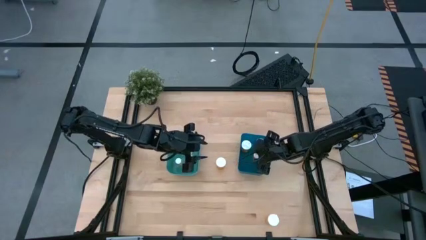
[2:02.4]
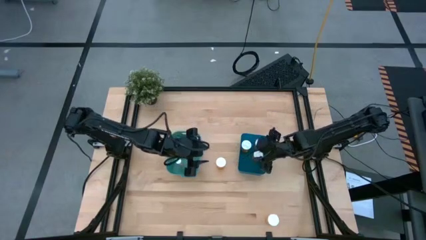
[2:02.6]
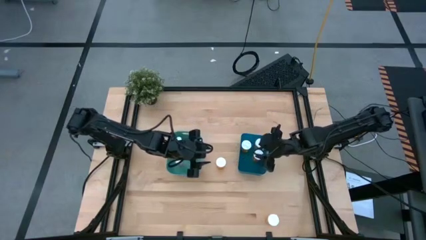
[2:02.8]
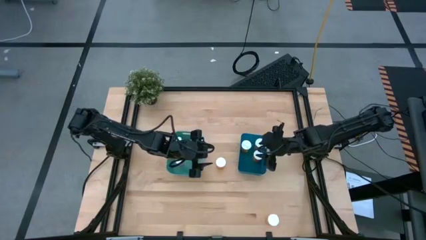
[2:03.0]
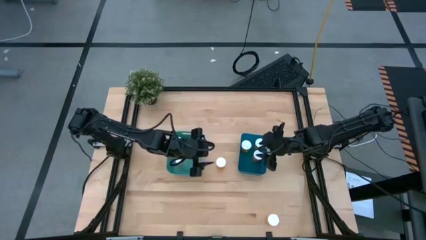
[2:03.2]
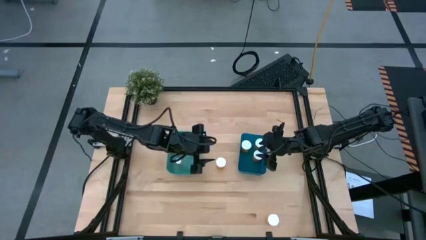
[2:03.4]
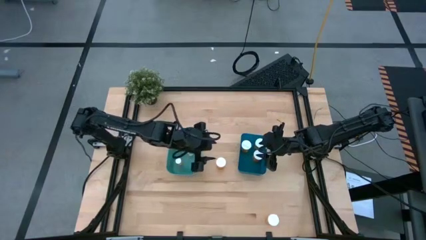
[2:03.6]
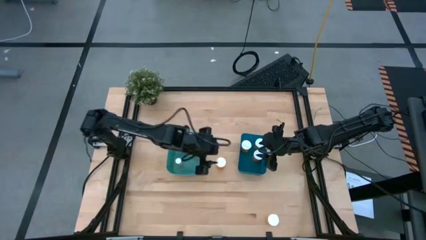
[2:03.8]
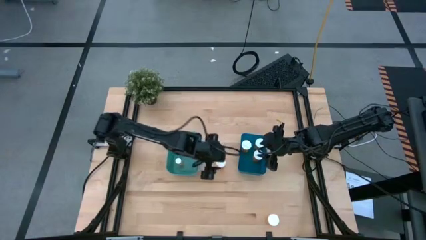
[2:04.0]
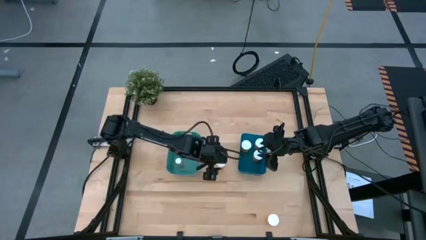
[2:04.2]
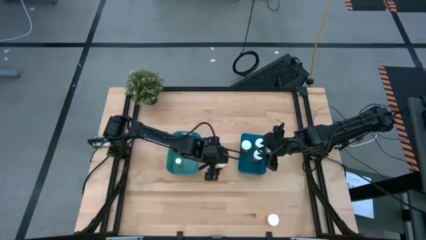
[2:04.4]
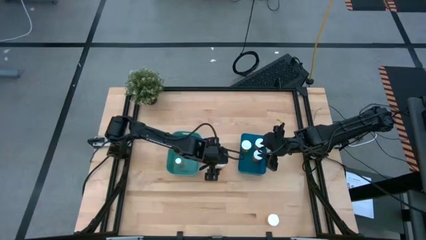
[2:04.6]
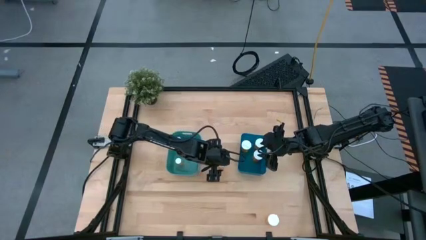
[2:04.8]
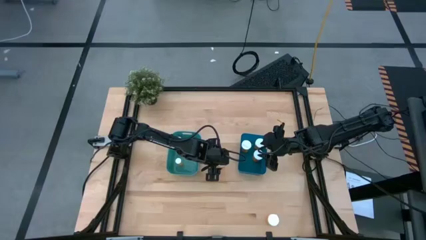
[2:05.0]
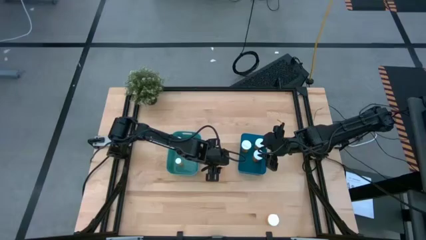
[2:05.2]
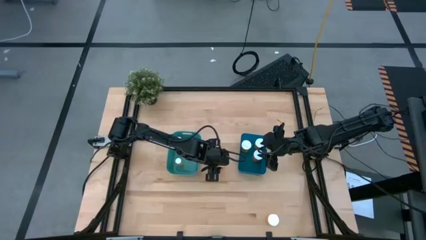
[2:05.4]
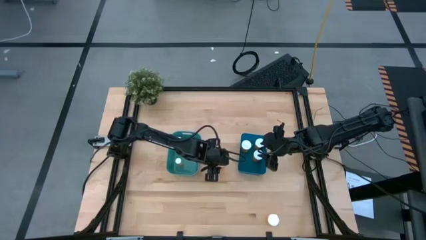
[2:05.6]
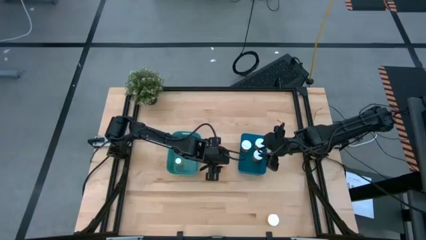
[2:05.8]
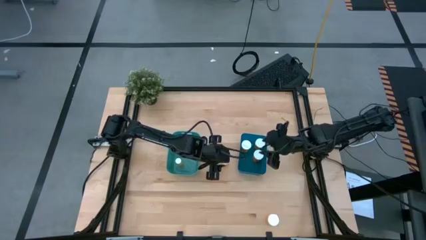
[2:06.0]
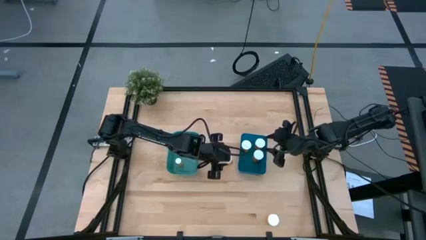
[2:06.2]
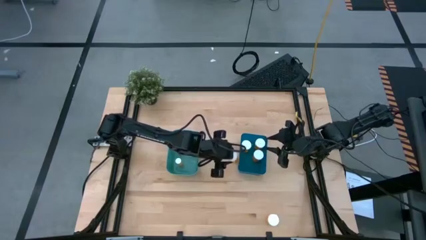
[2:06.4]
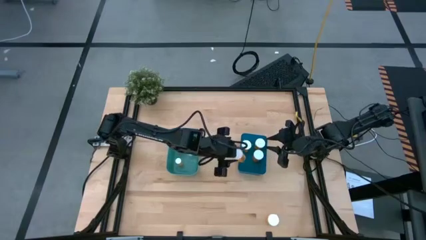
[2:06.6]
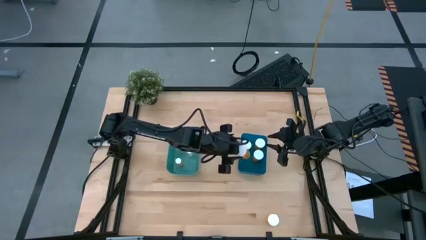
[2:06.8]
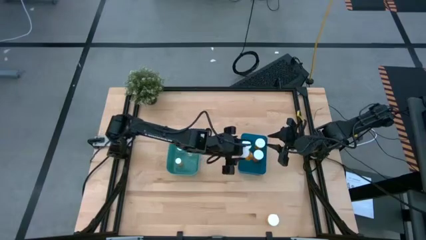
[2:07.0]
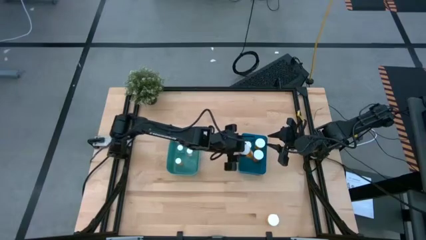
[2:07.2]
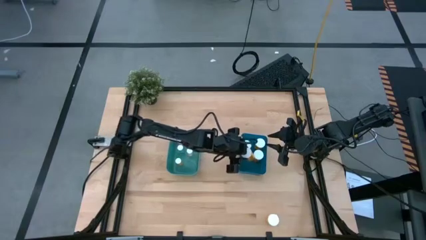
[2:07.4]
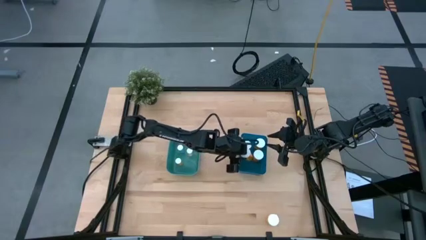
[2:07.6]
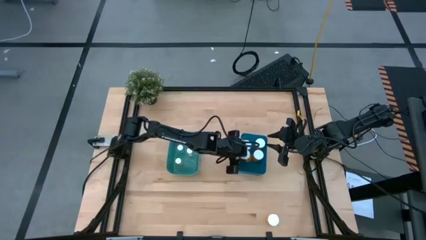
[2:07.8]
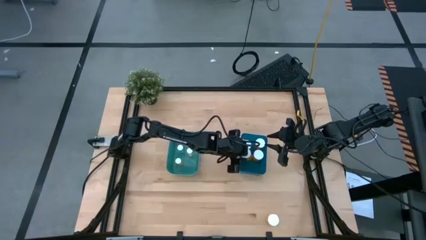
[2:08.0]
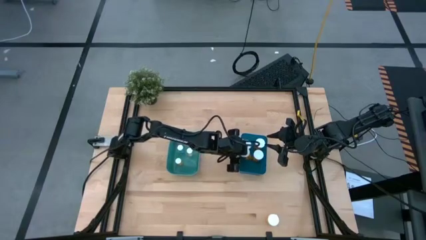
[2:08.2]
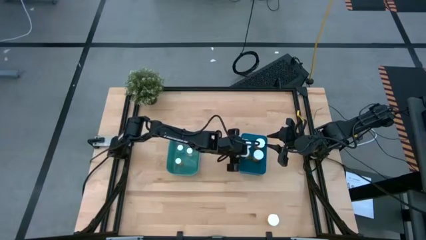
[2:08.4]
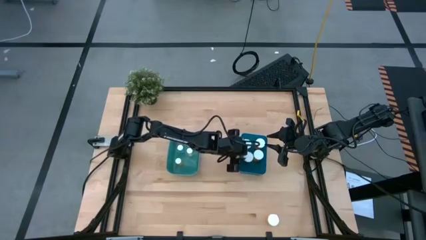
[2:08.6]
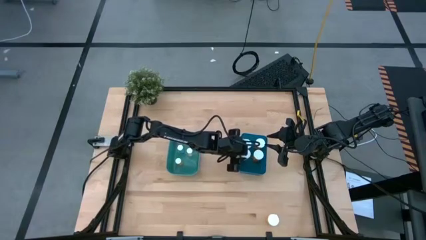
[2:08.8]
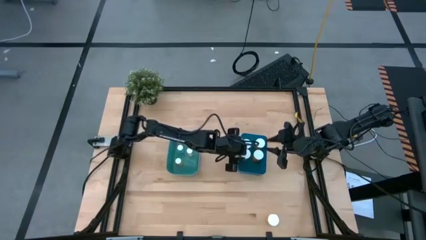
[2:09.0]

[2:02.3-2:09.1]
Task: Pick and place medicine bottles into bin by pill shape (circle, oval)
Put the large orange pill bottle into the blue bin

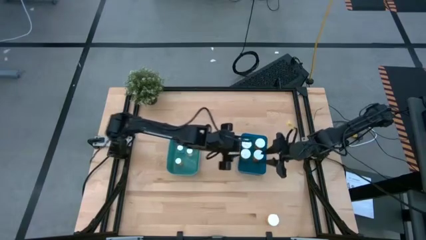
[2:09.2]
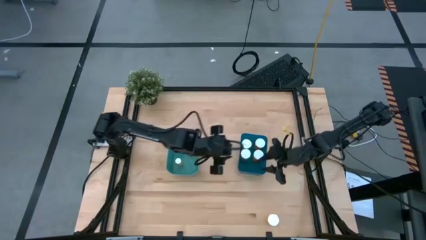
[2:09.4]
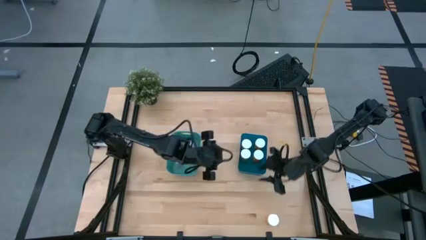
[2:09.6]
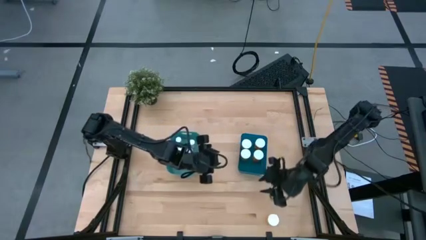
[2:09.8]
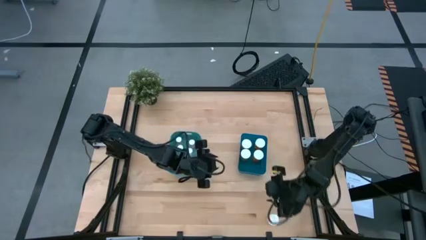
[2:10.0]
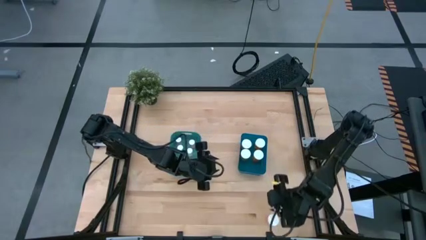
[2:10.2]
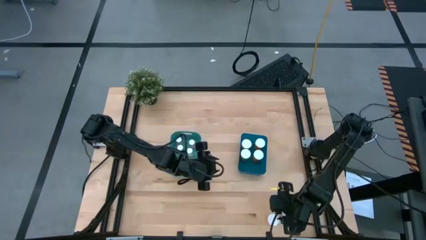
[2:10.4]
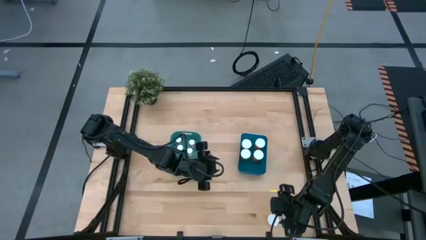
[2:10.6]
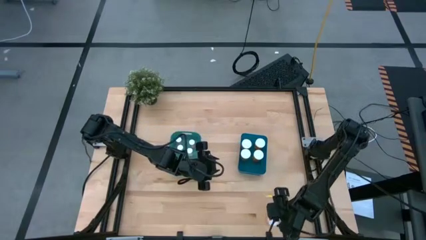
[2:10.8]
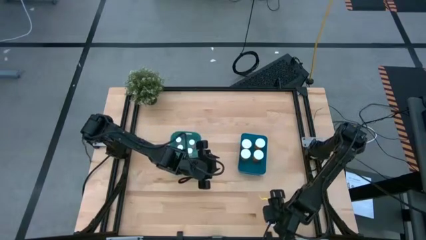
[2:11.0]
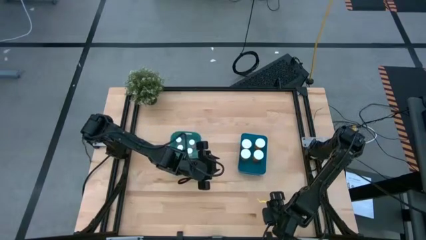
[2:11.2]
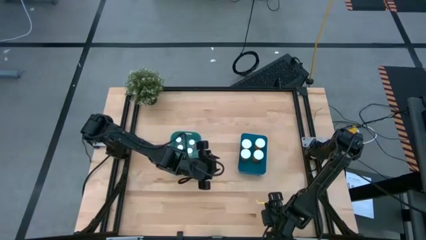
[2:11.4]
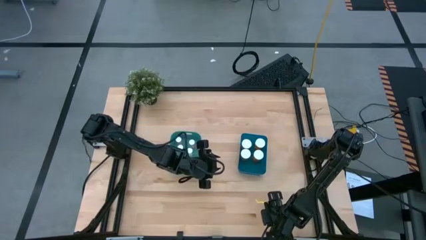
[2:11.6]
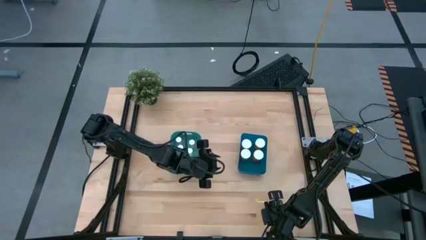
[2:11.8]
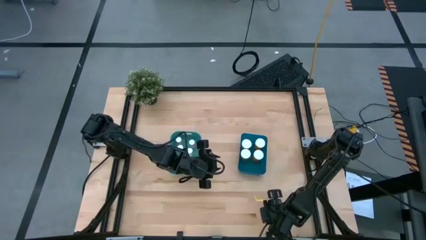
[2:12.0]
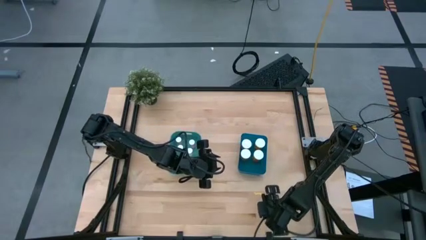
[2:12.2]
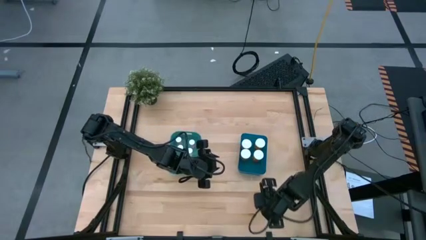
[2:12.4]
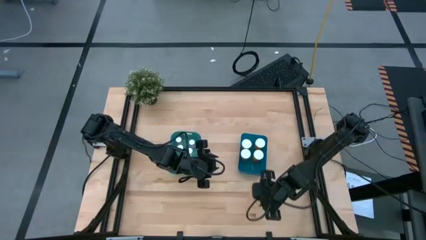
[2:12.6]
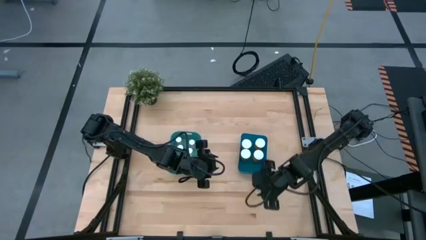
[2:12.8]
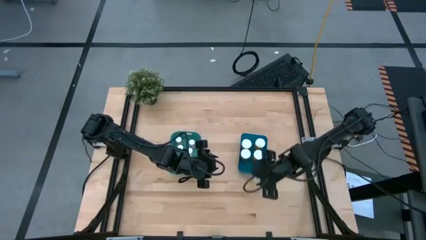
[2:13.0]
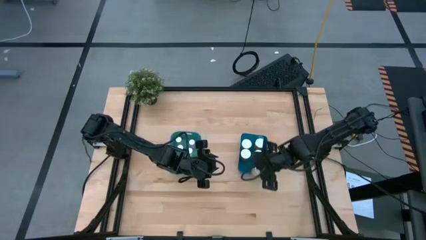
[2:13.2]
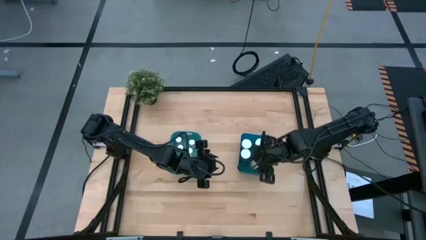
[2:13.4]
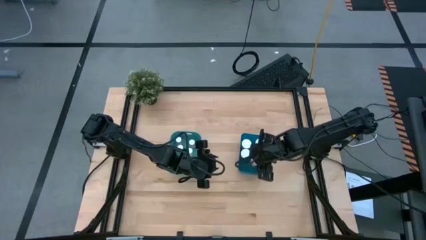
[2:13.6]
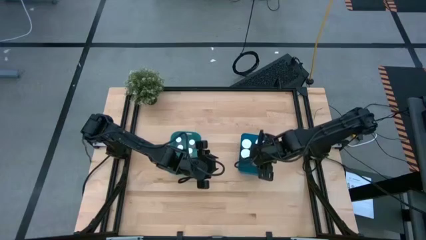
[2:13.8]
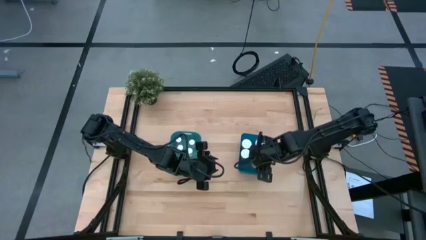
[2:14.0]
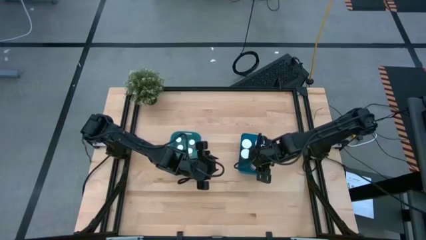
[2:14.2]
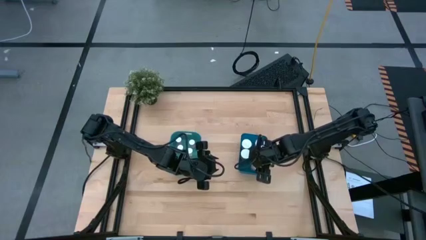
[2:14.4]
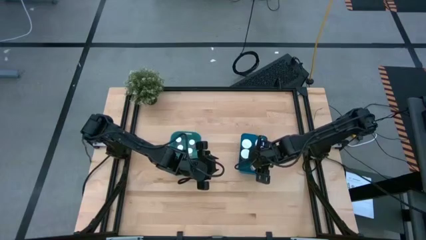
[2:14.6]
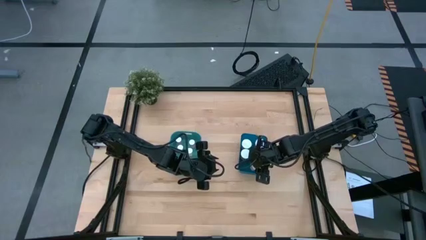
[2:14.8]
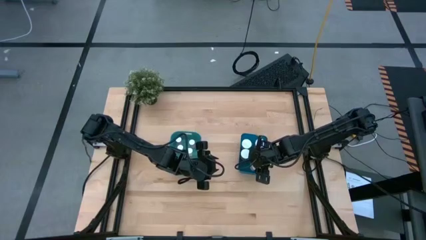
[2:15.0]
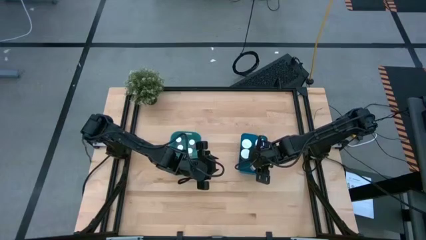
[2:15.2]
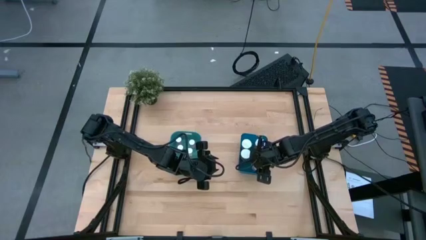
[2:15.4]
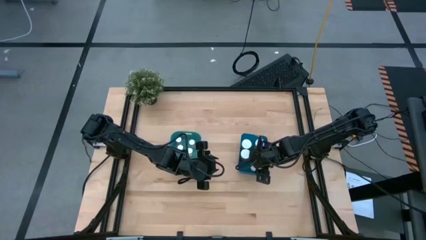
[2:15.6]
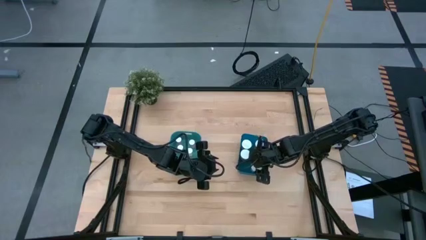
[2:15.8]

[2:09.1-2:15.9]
Put the large orange pill bottle into the blue bin

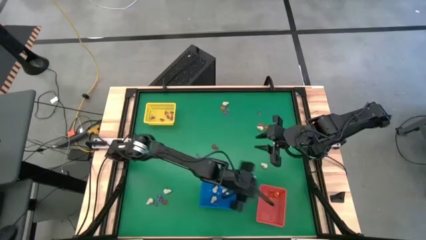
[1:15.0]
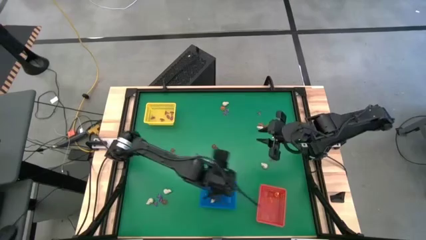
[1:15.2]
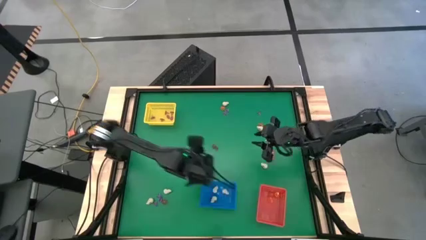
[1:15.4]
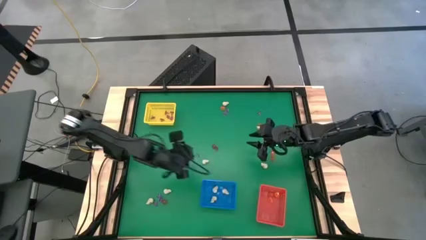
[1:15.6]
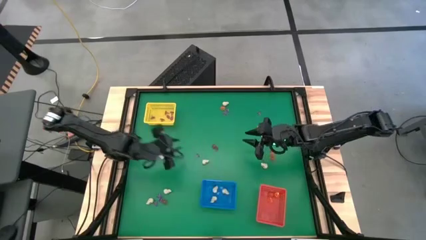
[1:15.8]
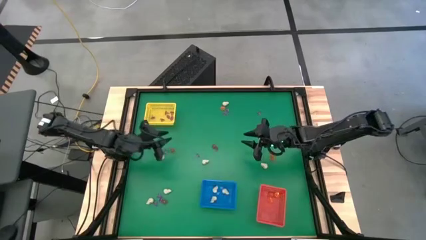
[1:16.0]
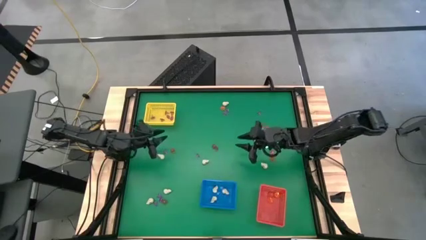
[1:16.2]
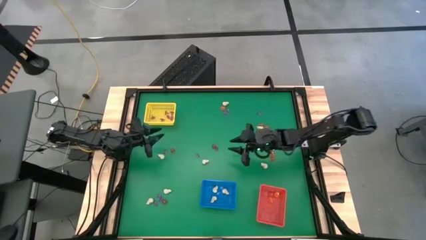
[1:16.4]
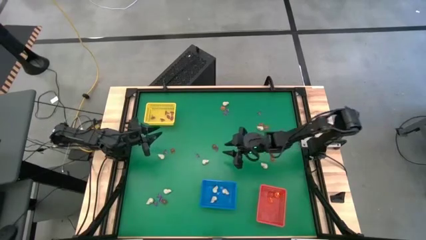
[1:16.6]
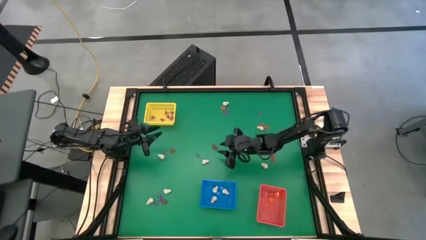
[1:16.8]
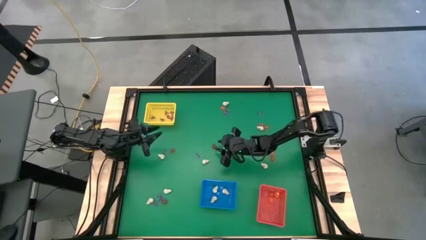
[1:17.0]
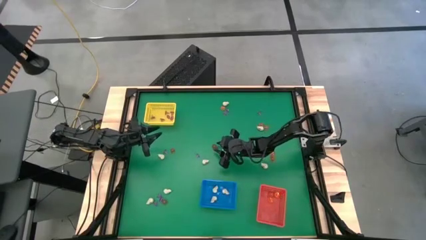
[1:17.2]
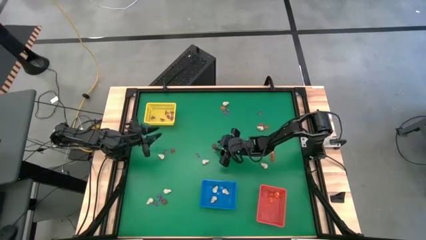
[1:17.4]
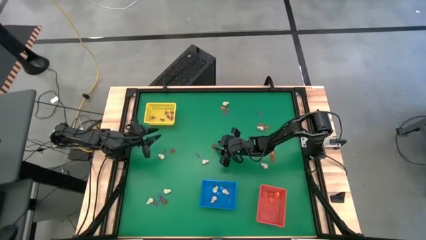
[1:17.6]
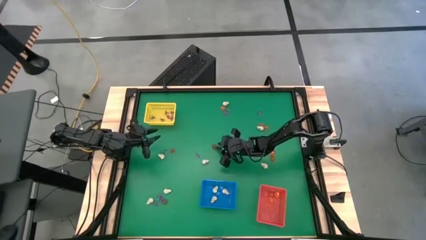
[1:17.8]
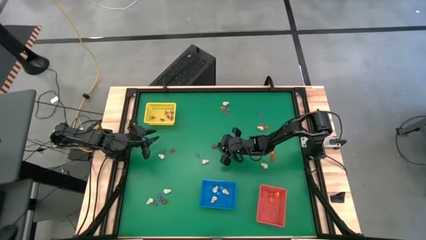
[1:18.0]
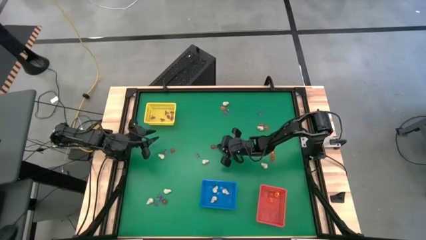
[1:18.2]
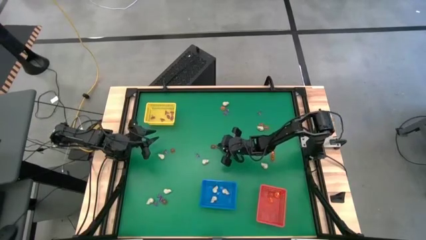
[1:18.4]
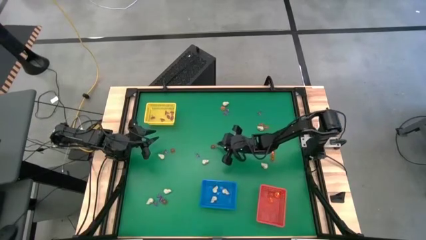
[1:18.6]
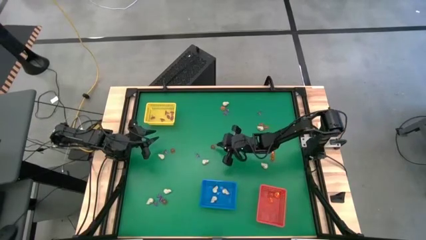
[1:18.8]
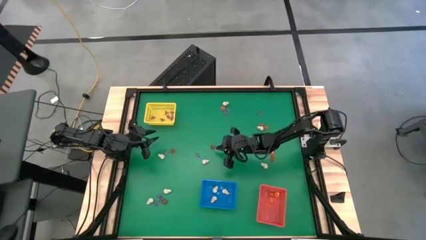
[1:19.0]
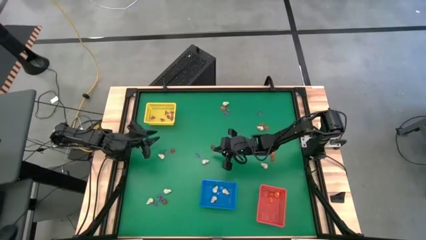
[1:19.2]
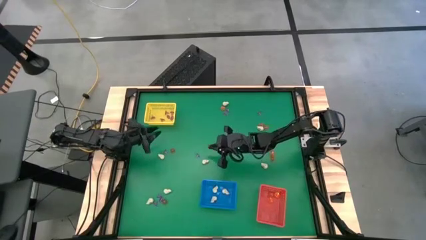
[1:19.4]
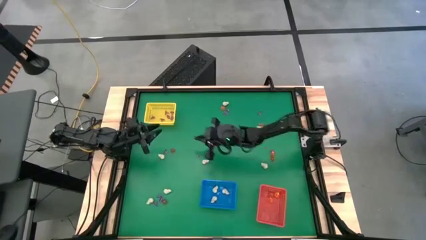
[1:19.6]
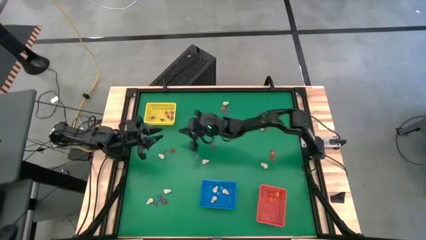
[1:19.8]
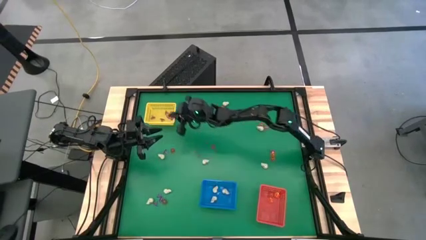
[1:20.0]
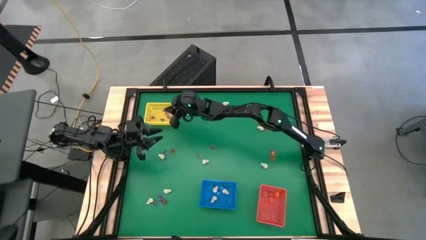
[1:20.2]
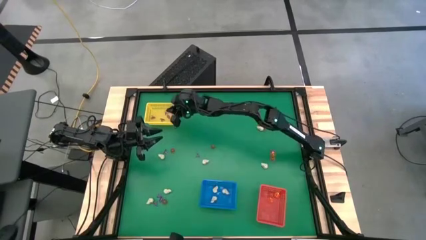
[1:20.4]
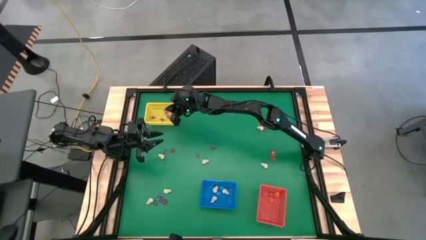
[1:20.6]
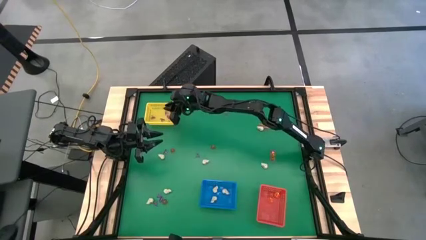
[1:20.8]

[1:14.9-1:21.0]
Task: Sort Halloween decoration
Put the purple witch hat toy into the yellow basket
